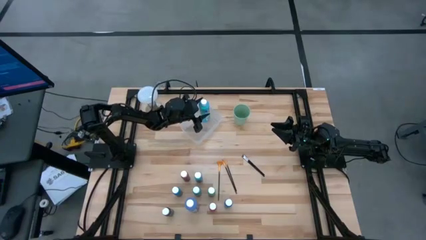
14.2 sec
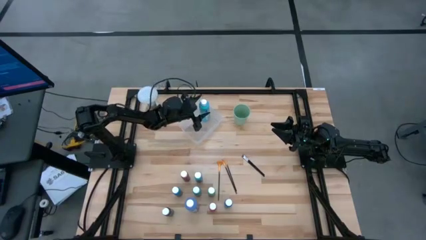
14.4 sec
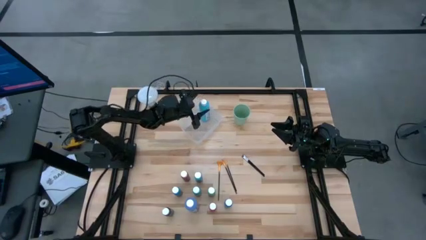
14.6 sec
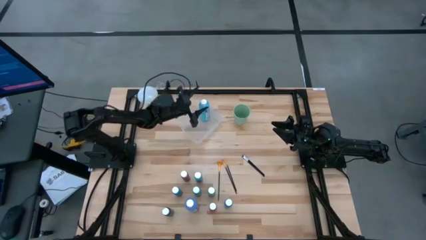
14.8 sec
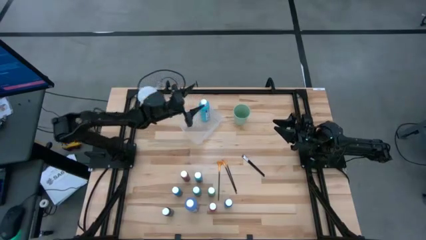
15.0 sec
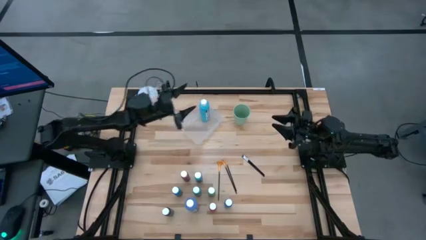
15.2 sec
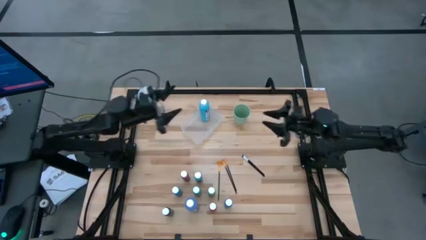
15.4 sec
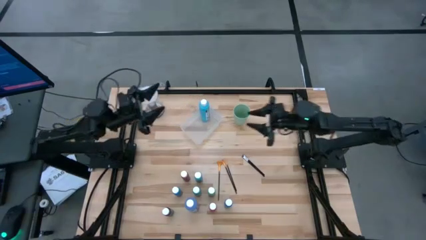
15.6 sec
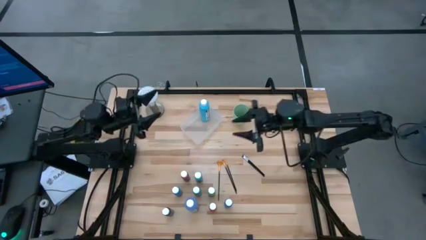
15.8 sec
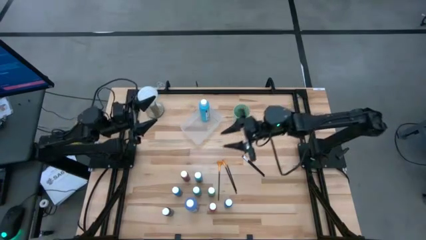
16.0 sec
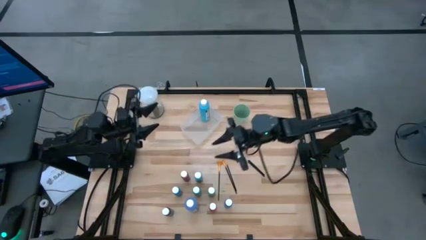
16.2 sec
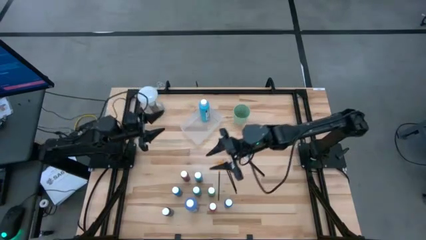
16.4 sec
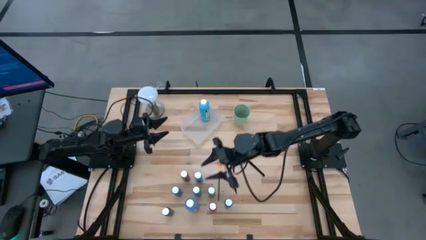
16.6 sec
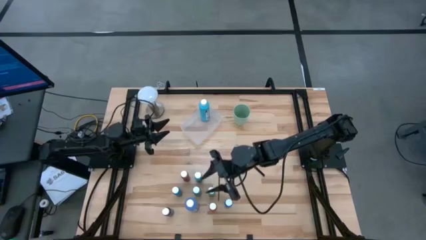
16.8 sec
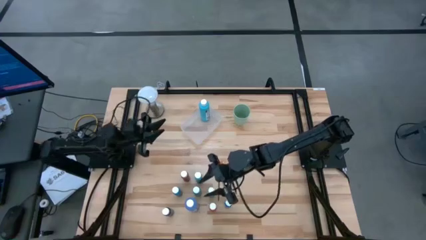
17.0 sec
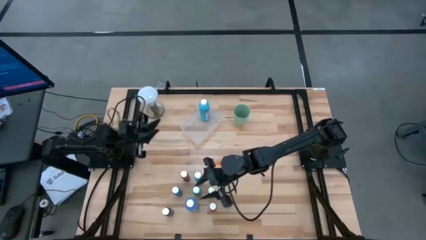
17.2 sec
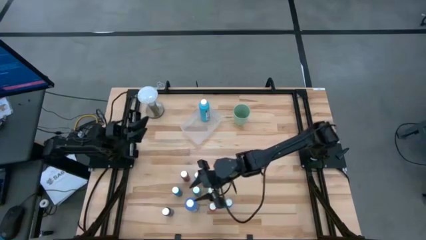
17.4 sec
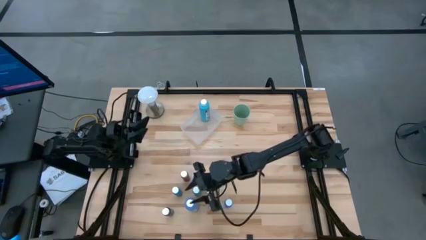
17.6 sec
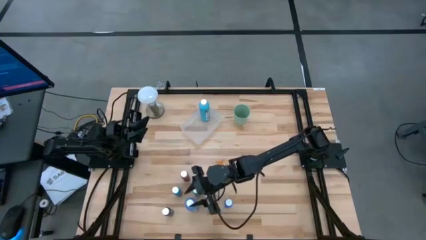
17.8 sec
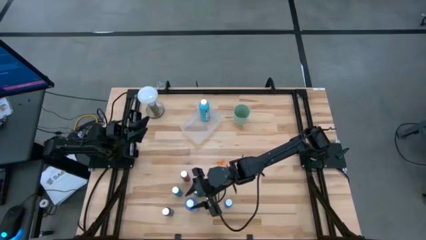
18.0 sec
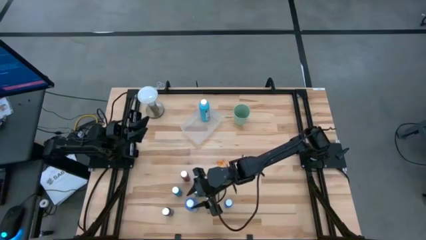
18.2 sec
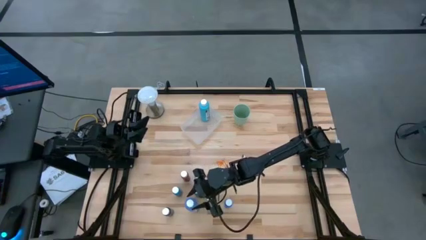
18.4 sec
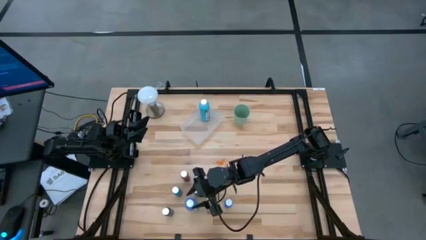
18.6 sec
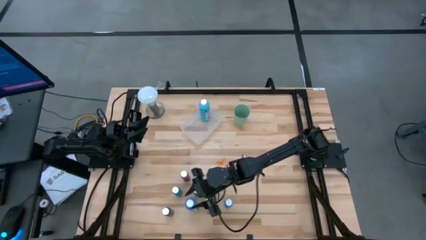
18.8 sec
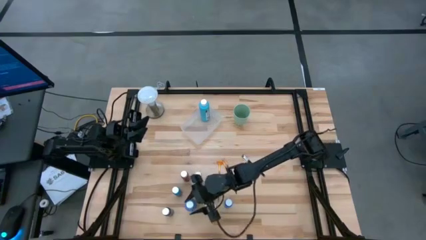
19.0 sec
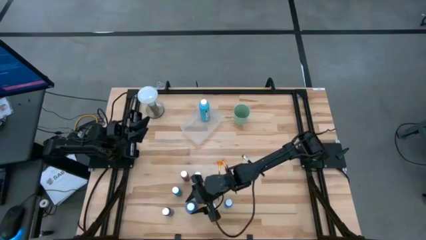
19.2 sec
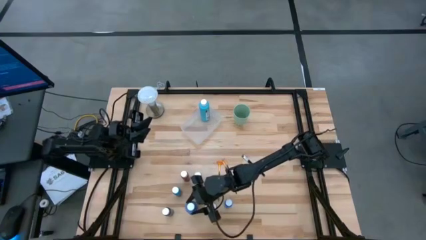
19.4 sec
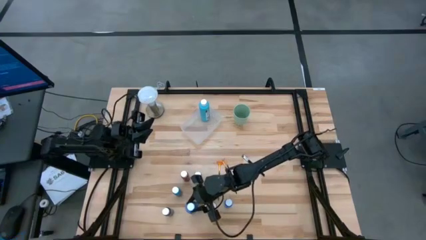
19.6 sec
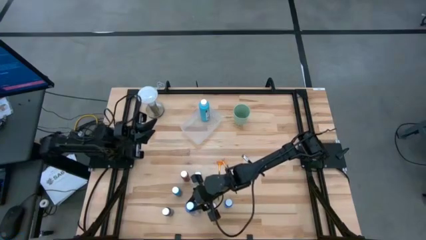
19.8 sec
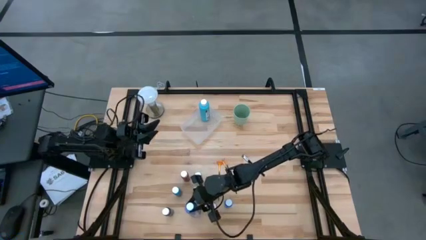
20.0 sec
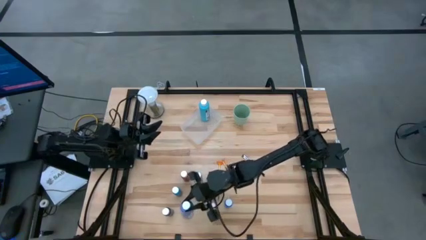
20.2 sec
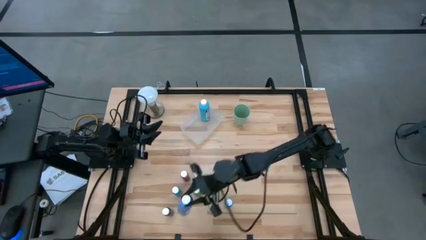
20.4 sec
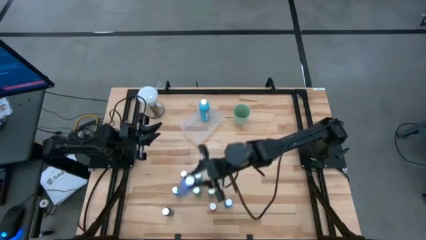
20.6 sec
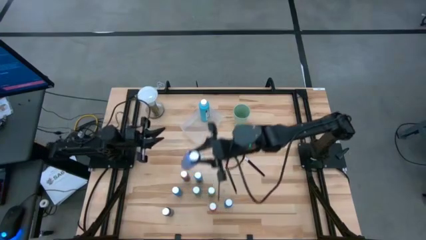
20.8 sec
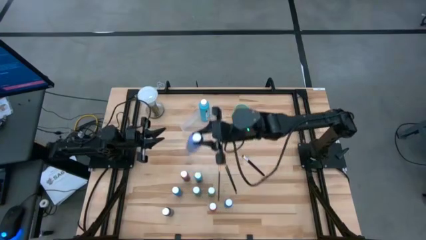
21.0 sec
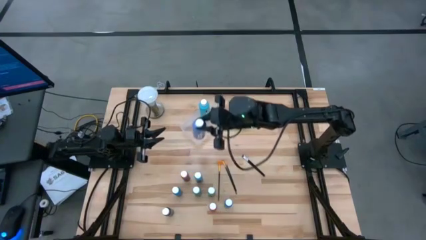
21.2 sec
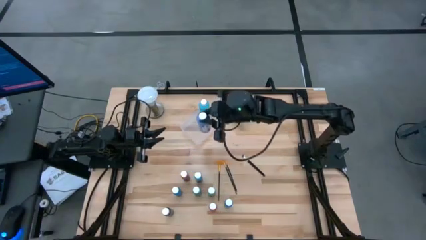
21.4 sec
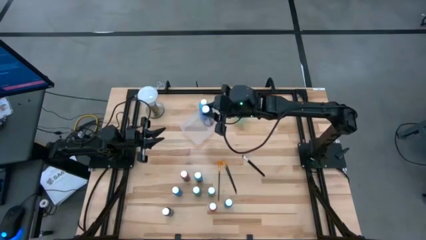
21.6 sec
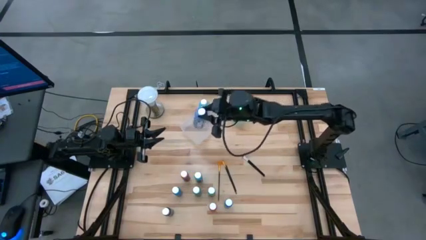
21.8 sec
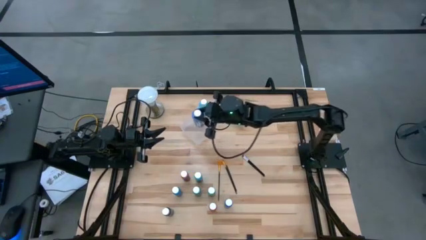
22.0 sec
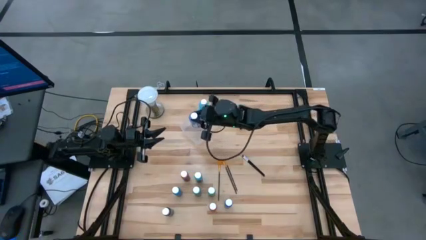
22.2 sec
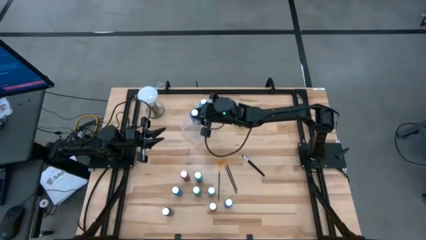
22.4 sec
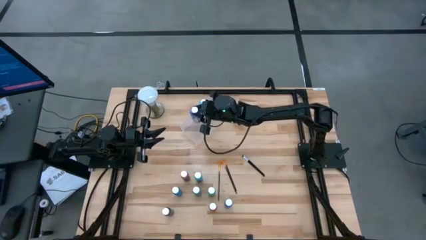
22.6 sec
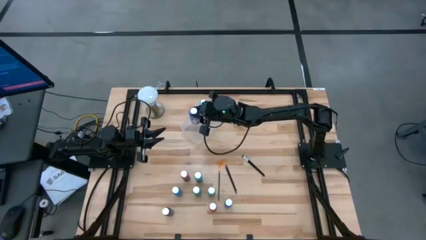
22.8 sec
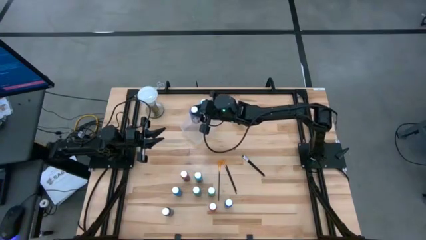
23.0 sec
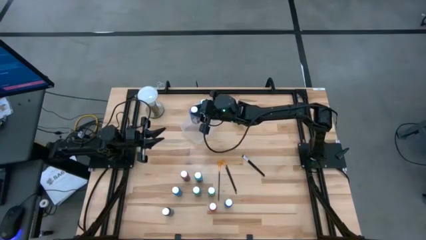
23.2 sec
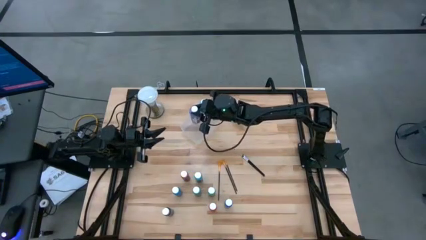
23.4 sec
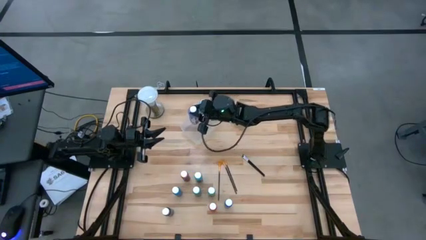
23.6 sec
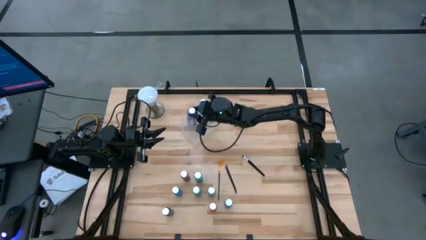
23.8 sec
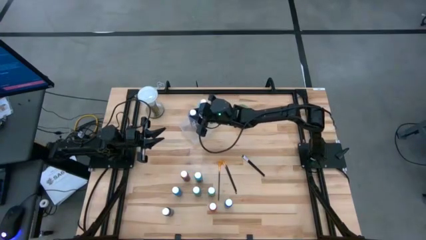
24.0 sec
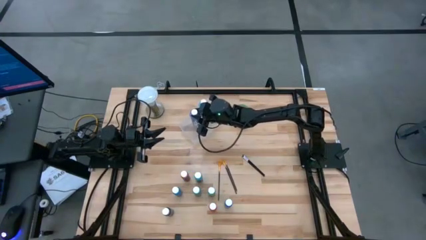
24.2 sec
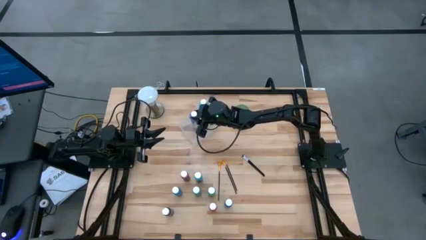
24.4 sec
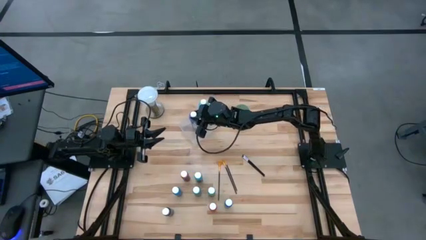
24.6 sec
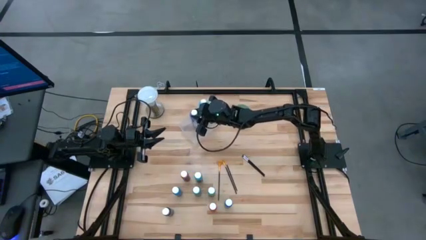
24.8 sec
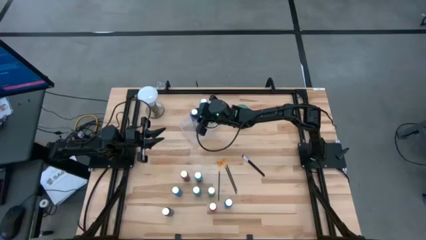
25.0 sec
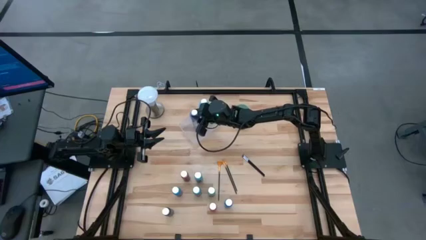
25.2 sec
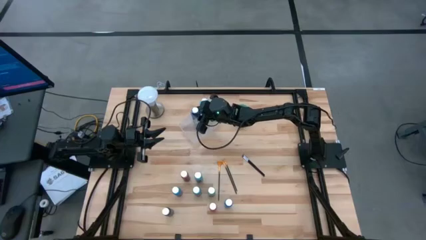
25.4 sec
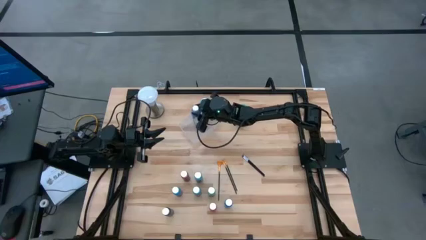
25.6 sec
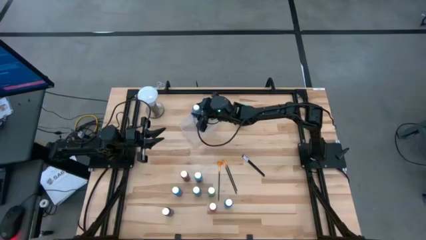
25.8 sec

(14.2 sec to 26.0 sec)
Task: Pick & Place Paint Supplies
Put the large blue paint bottle into the transparent bin

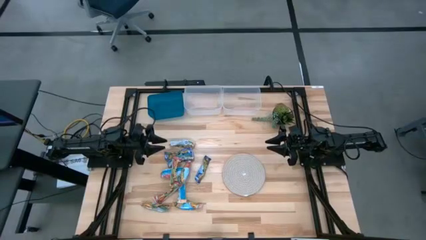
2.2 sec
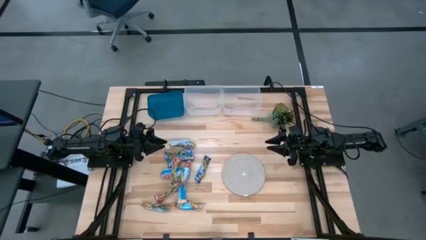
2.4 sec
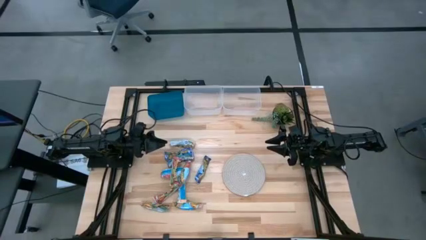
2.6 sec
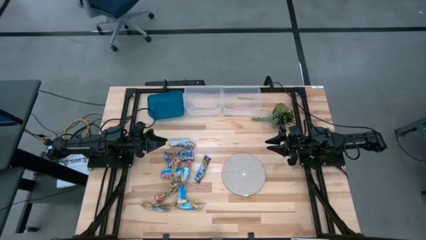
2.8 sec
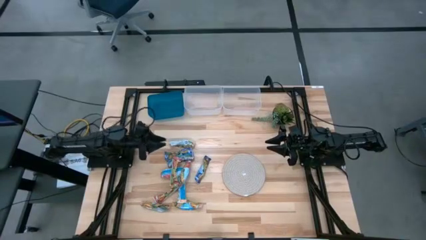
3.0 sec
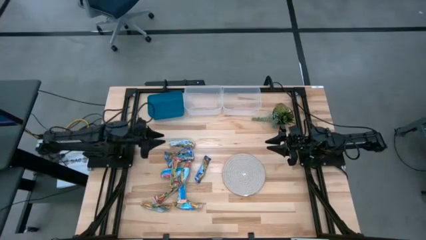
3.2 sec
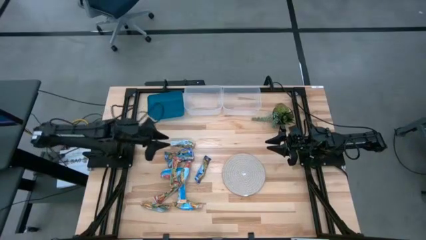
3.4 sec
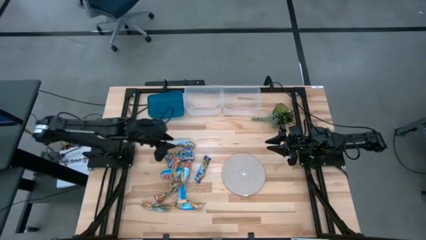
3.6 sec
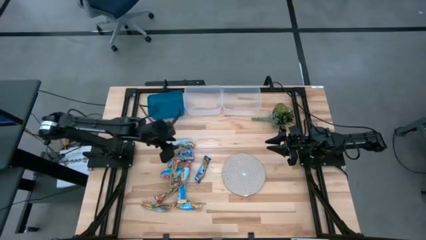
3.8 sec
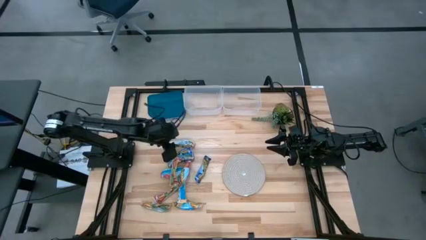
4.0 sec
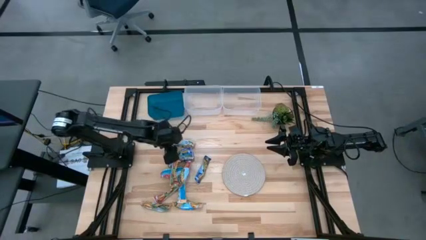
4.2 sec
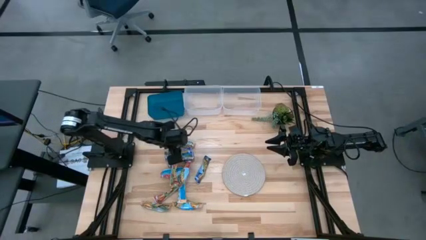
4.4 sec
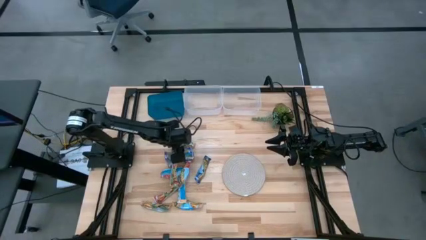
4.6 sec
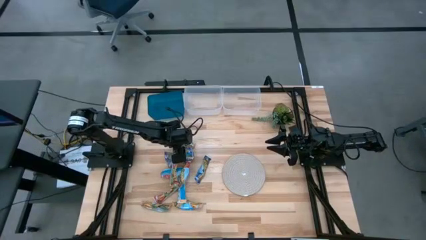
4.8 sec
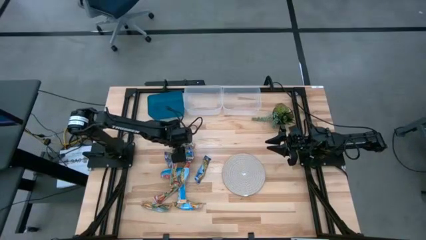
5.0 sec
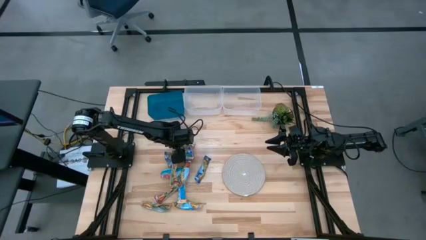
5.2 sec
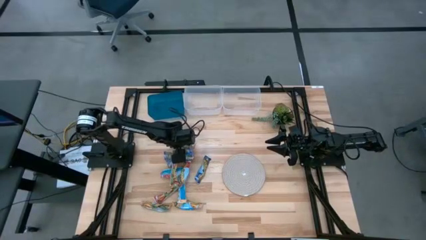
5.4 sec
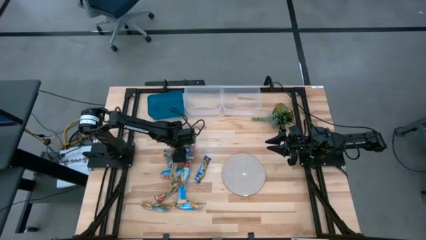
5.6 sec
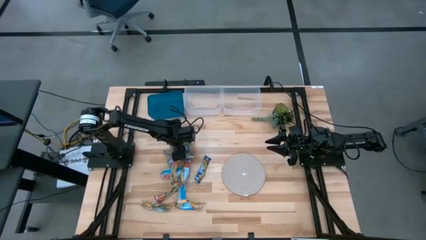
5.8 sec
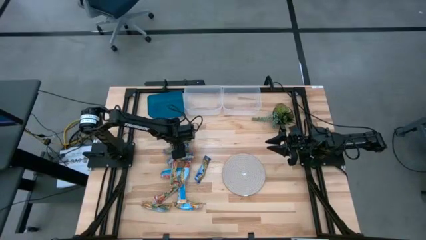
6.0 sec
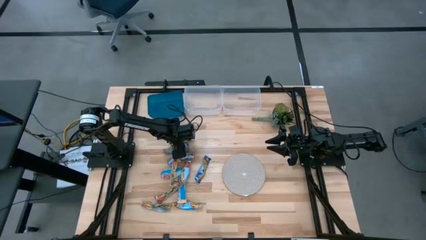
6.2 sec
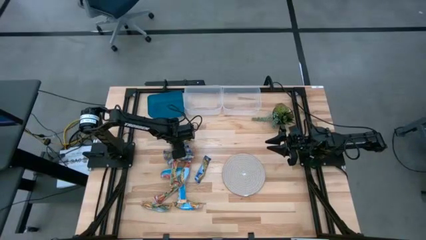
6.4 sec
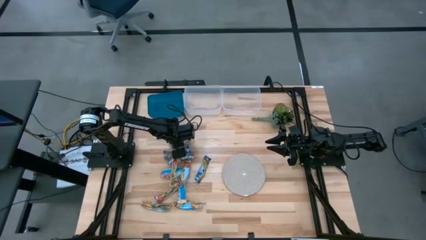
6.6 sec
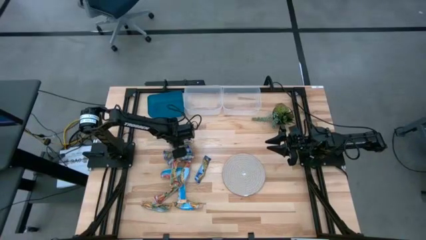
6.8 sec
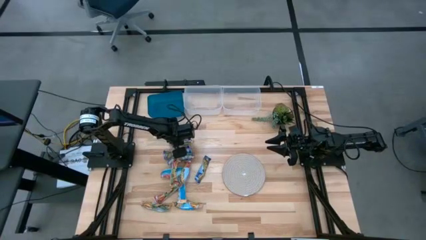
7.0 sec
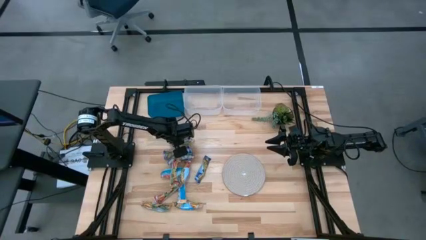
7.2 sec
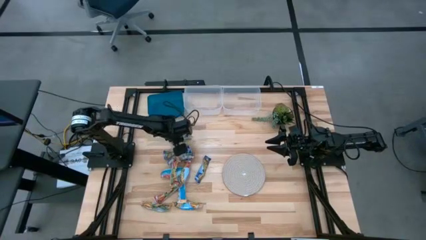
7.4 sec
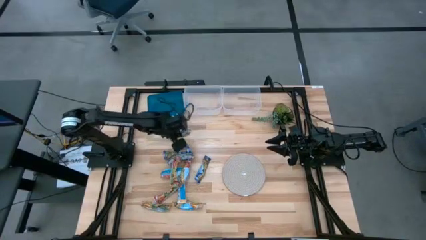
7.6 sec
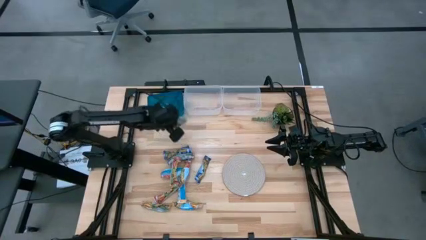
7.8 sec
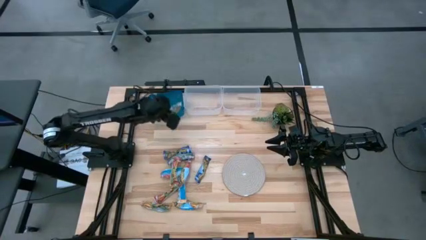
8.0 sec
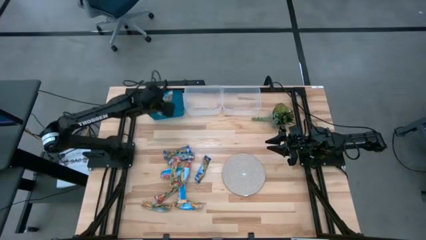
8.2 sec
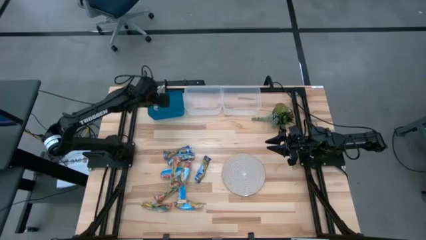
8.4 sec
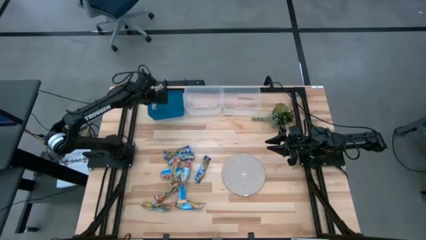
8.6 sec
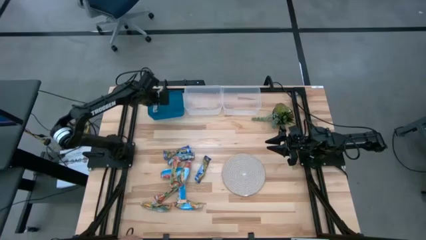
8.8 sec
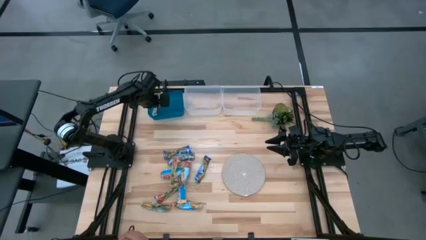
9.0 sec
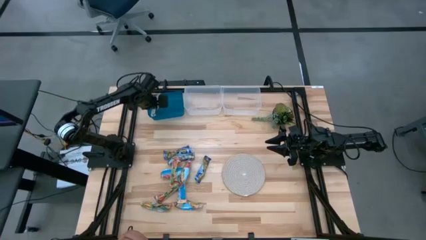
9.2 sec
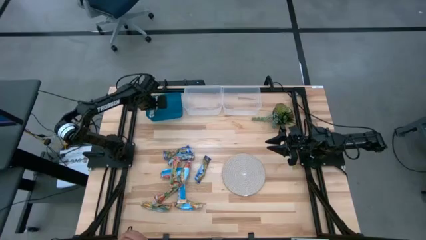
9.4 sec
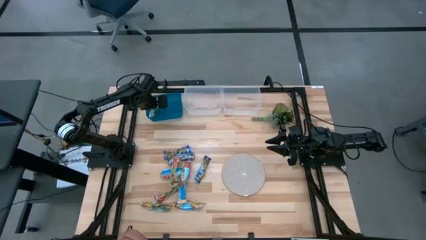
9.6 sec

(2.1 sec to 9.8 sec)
Task: Pick and place Granola Bars by type
Put the yellow granola bar into the blue bin
